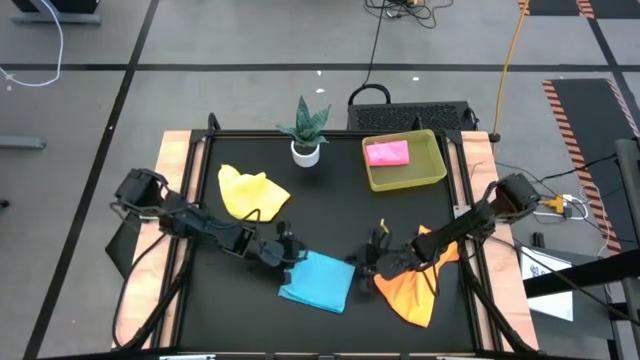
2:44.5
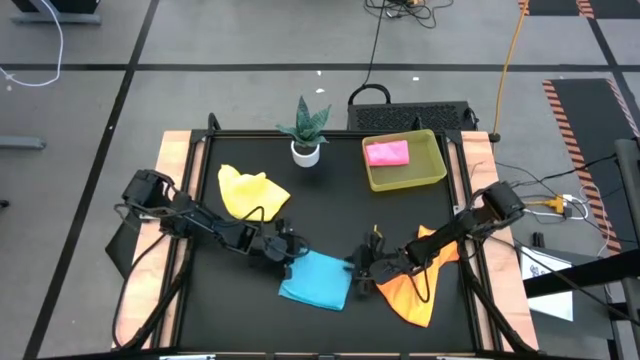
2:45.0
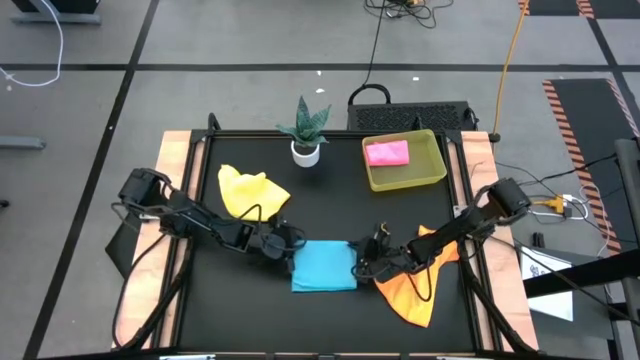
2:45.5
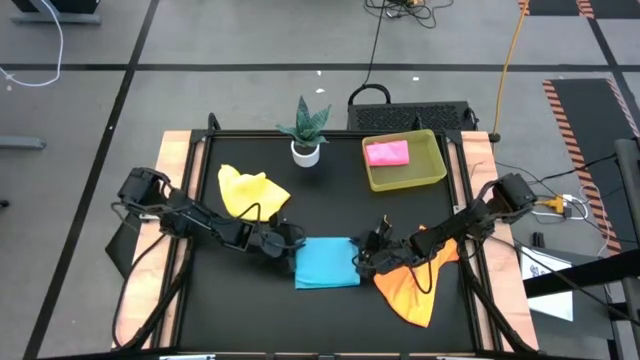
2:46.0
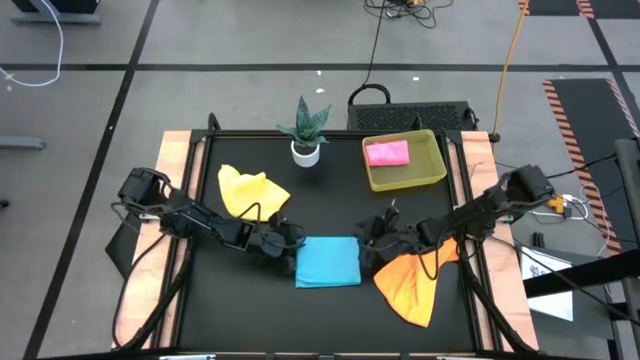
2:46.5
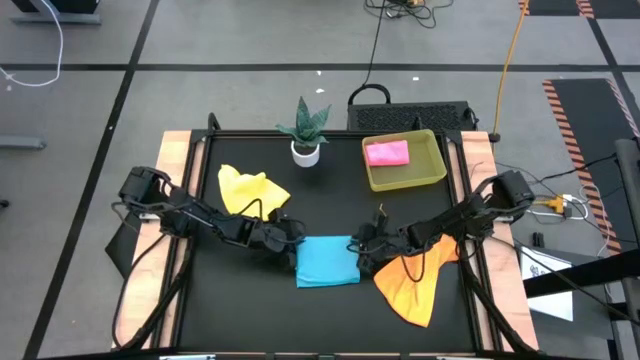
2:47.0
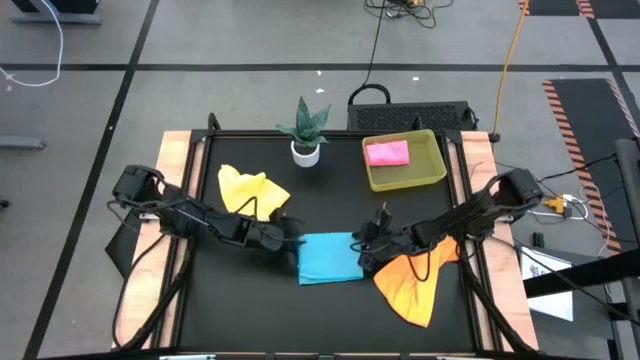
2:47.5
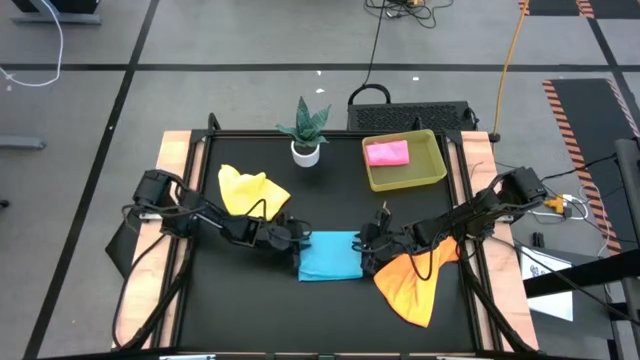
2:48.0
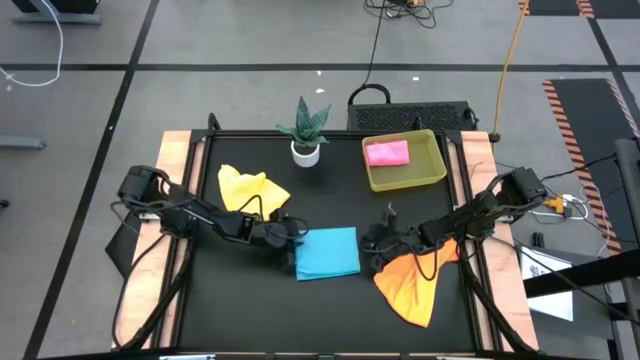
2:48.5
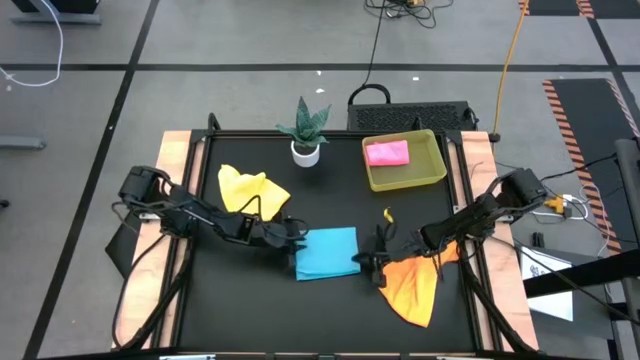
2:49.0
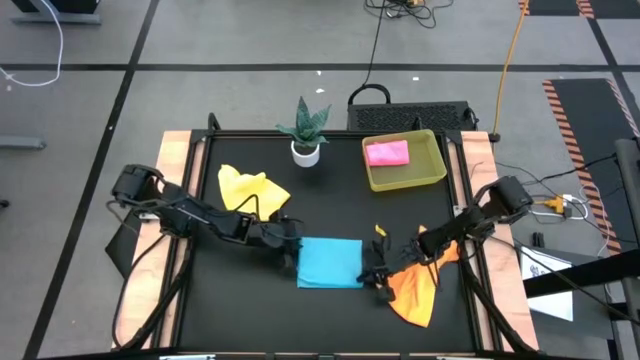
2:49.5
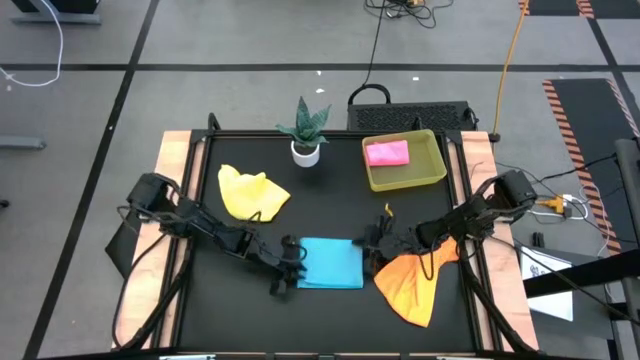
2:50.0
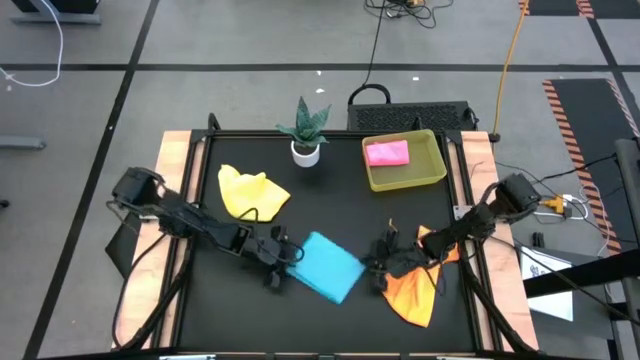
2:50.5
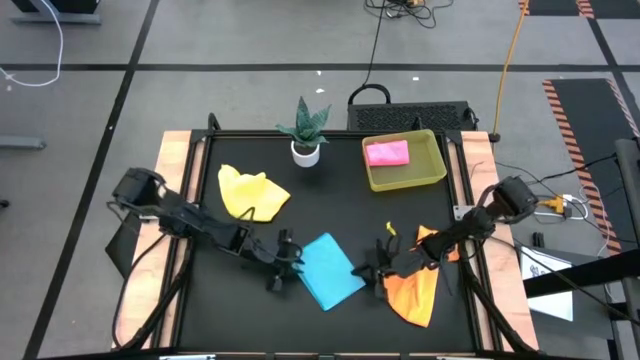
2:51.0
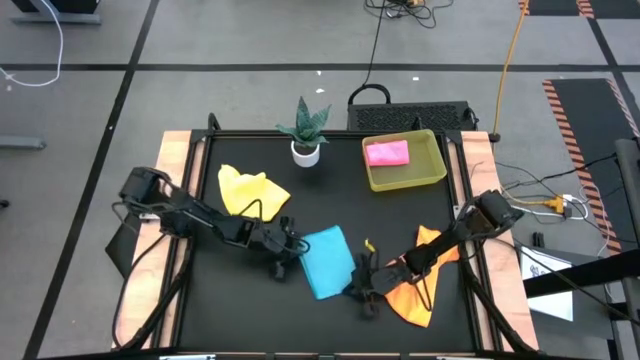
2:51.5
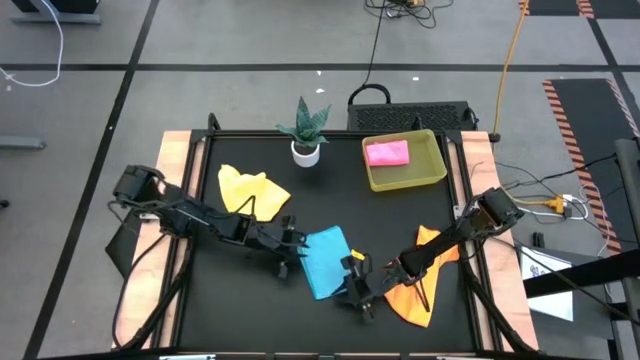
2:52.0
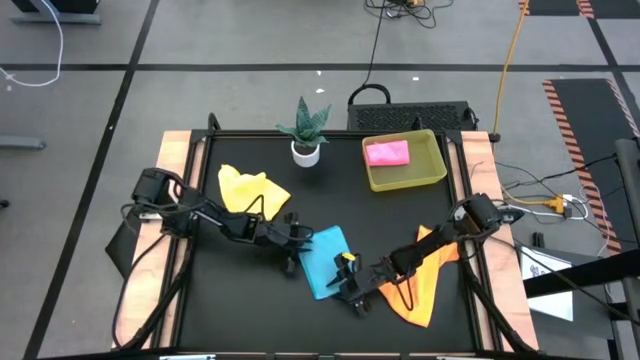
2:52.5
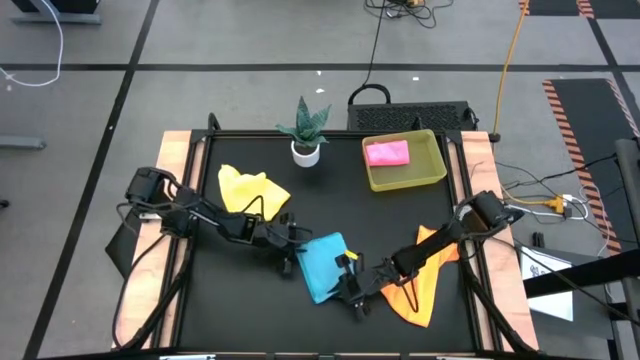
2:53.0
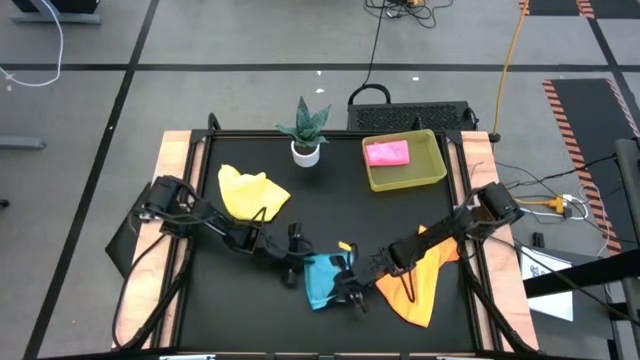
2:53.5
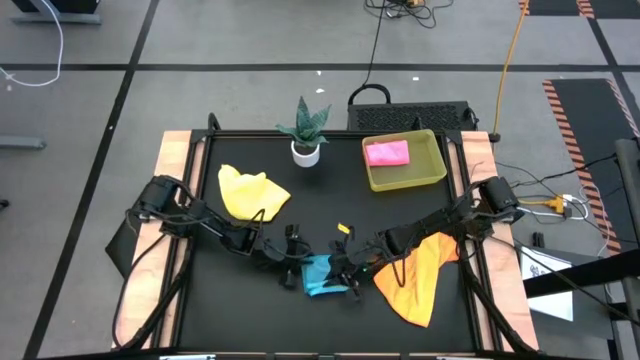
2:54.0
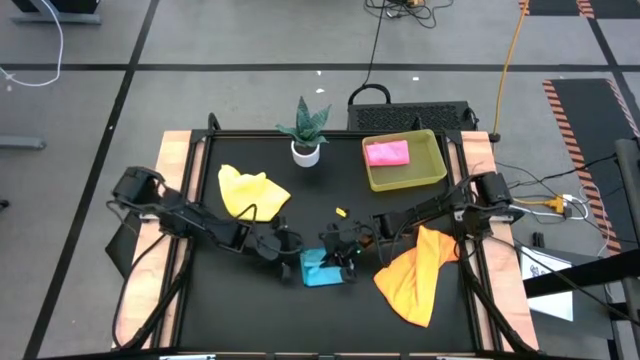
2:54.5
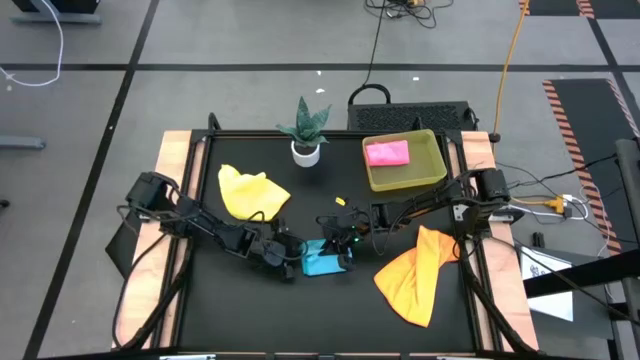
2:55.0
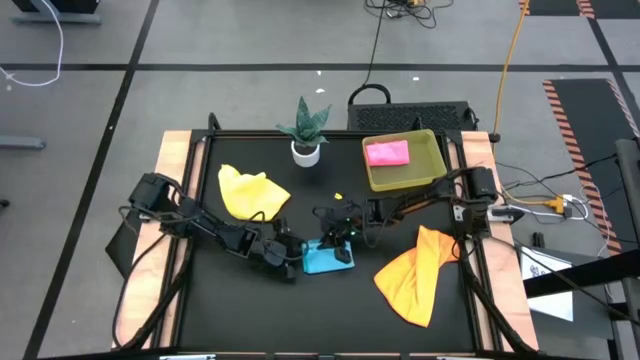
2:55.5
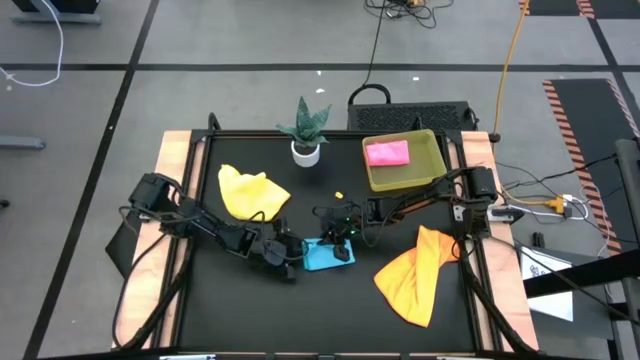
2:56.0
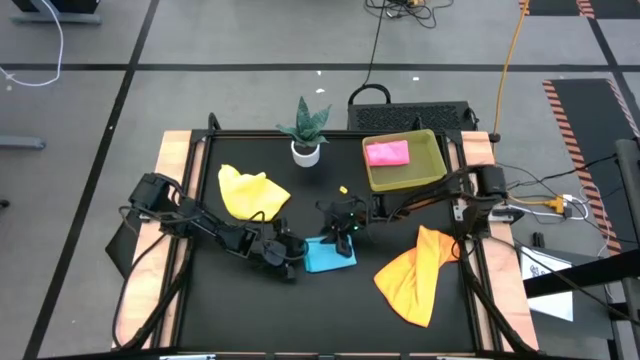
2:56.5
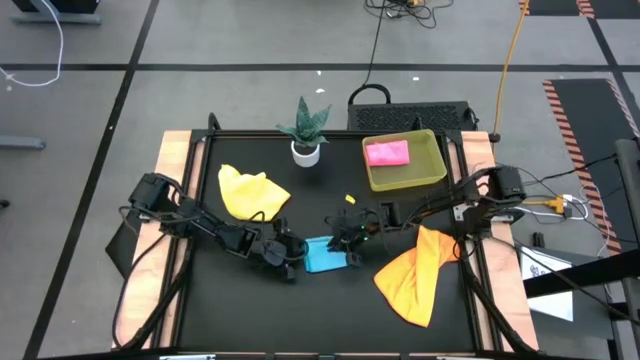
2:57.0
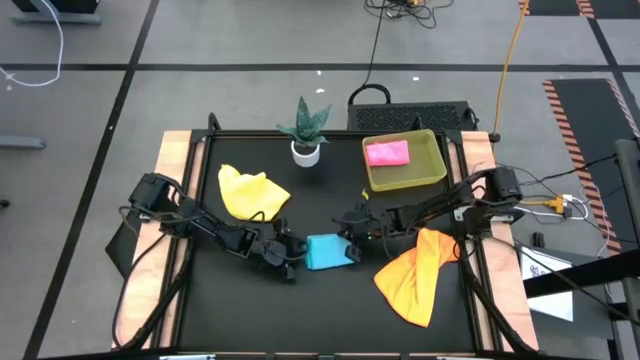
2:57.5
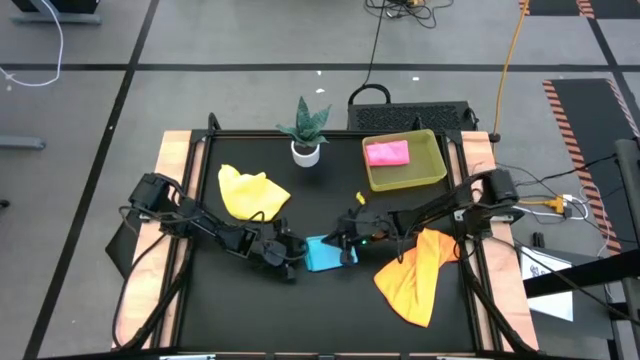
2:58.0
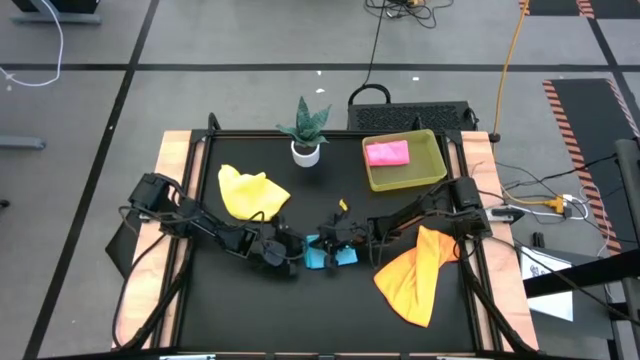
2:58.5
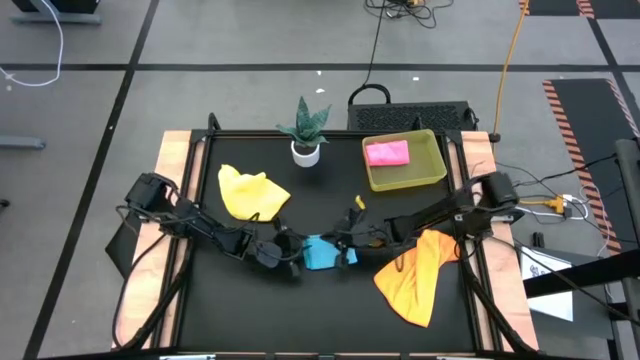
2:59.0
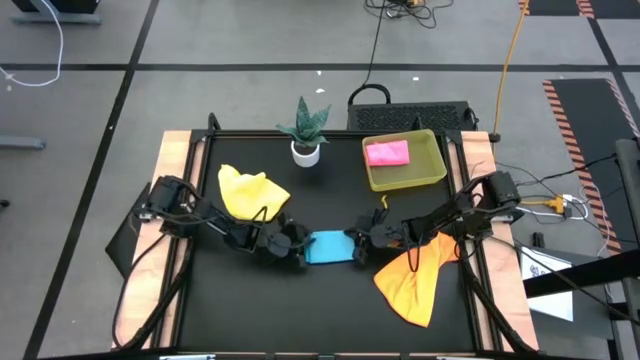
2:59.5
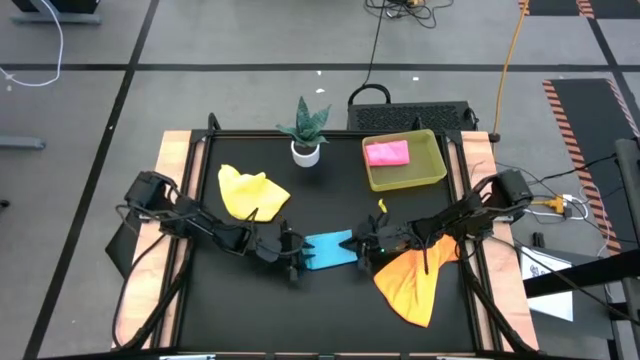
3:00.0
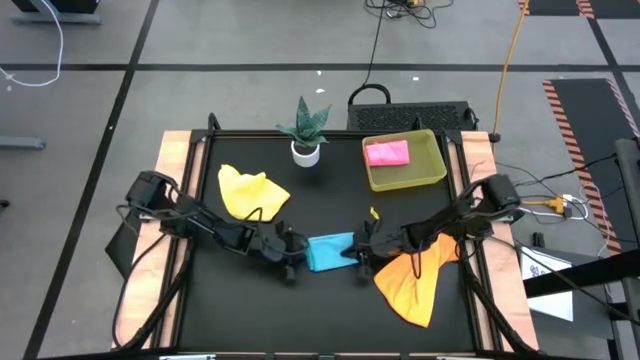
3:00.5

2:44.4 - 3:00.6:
Task: Fold microfiber towels
Fold the blue microfiber cloth

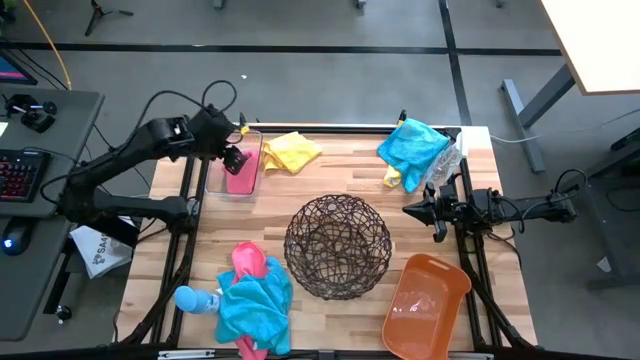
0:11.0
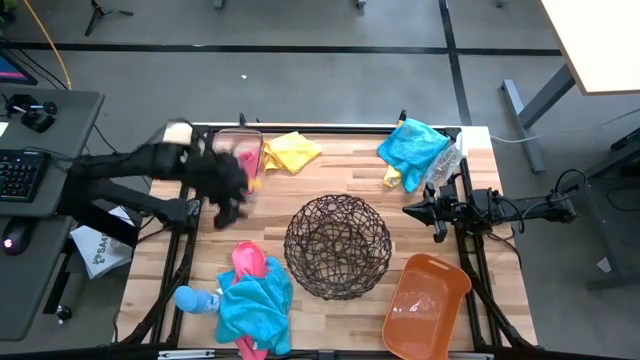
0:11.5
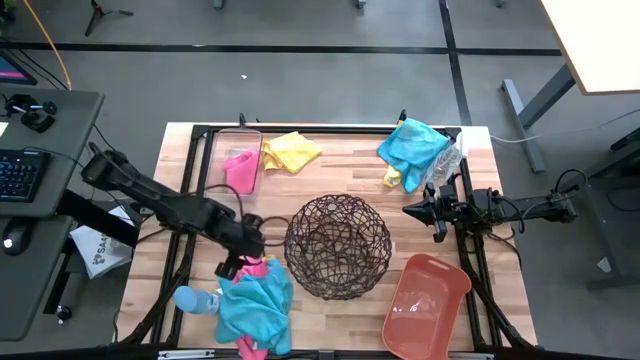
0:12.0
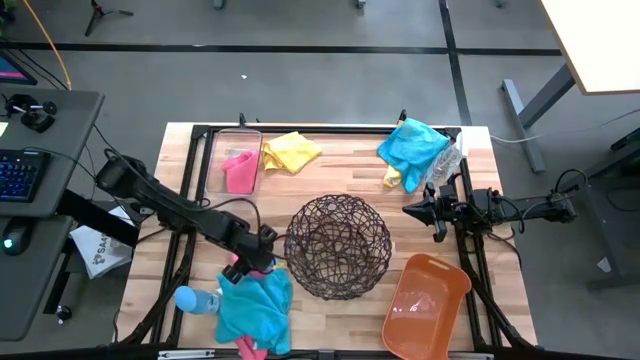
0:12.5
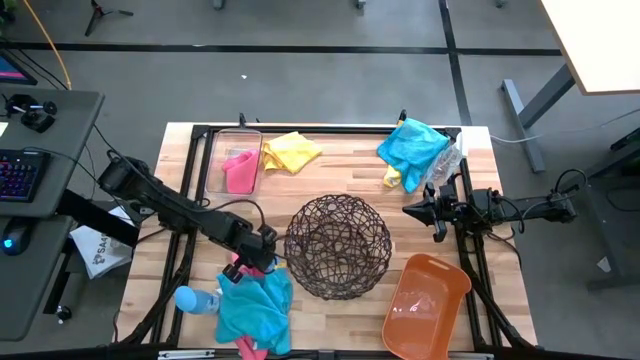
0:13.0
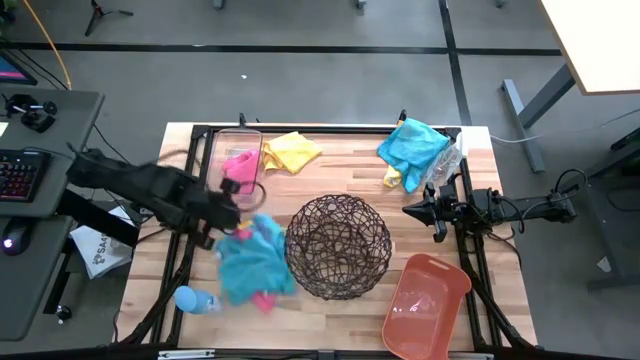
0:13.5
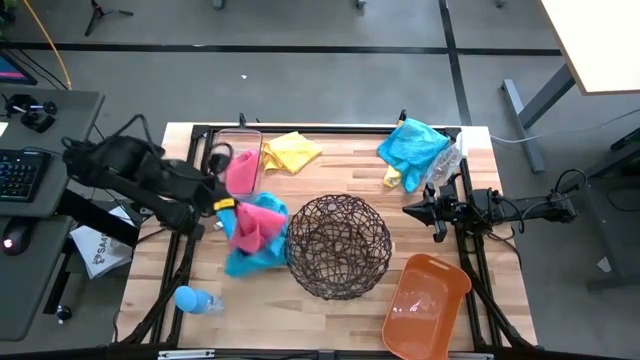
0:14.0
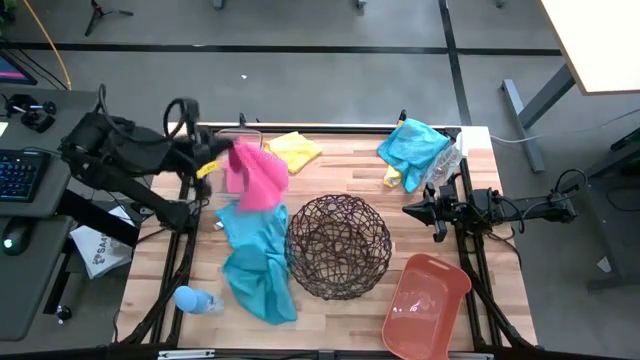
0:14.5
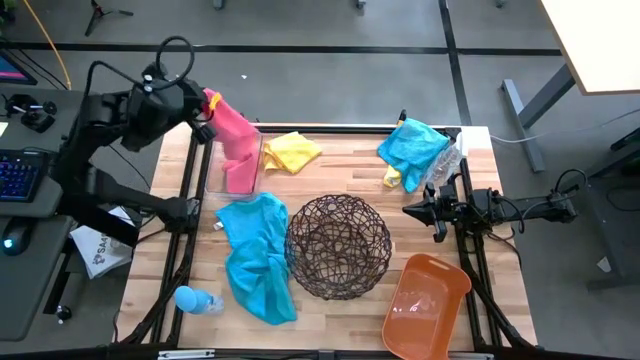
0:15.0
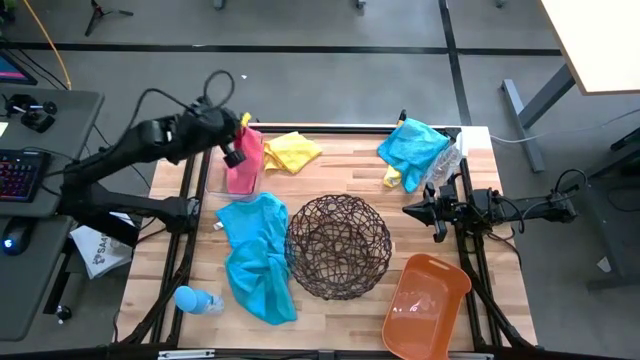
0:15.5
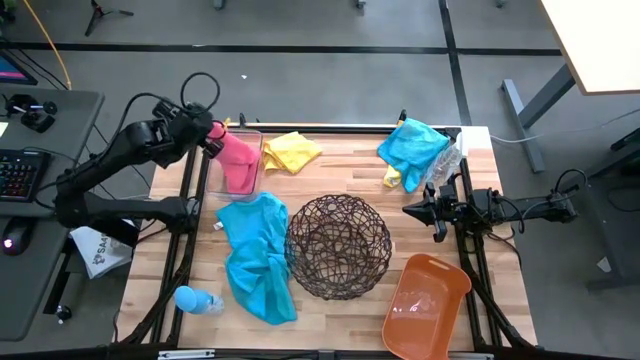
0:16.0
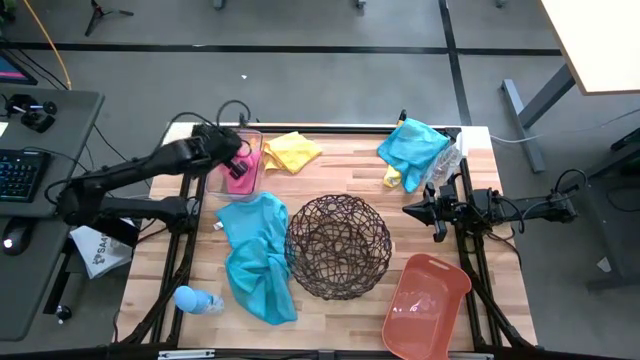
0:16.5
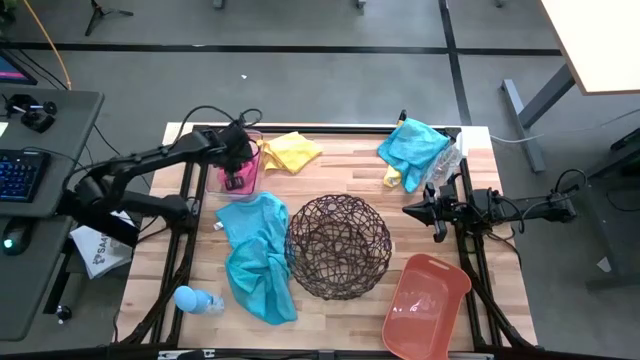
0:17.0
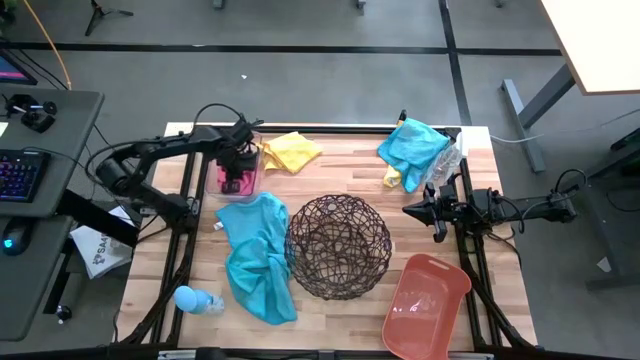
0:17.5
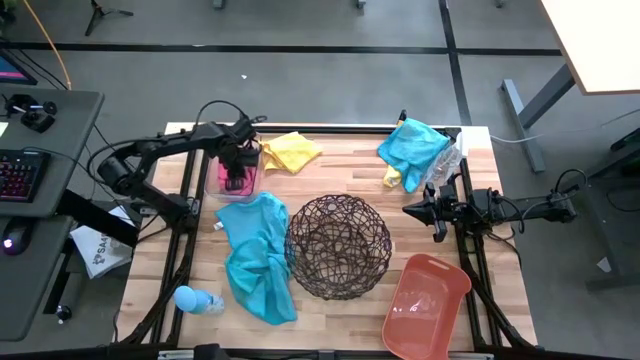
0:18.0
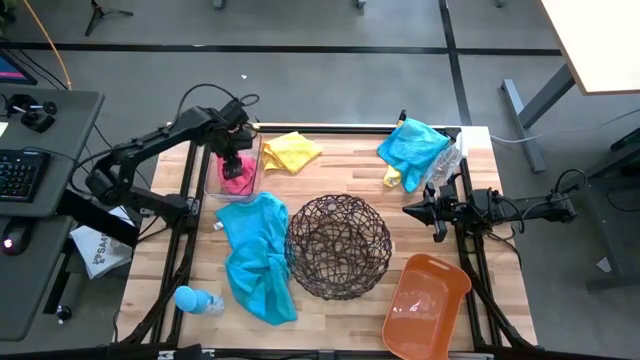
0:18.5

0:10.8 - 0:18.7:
Task: Sort microfiber towel by color & place in baskets
Put the pink towel into the transparent bin
